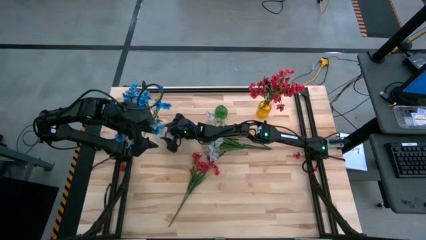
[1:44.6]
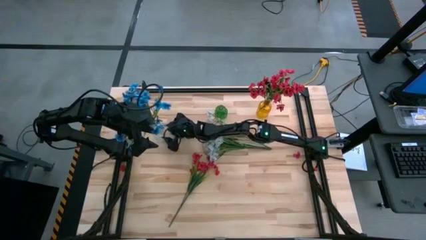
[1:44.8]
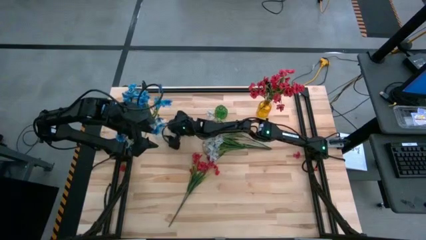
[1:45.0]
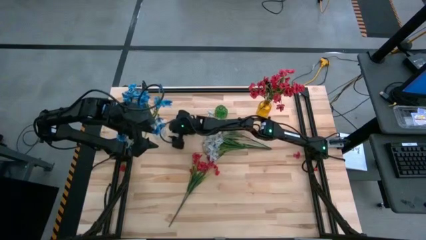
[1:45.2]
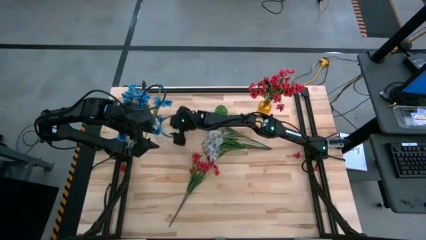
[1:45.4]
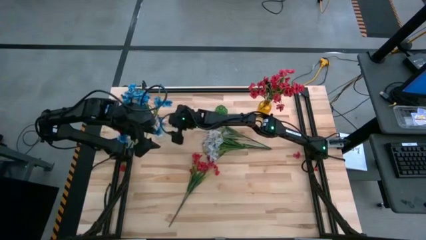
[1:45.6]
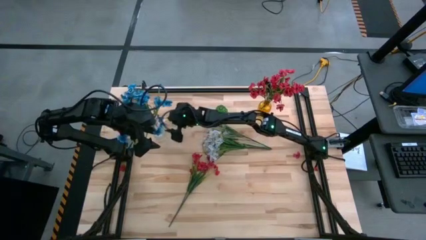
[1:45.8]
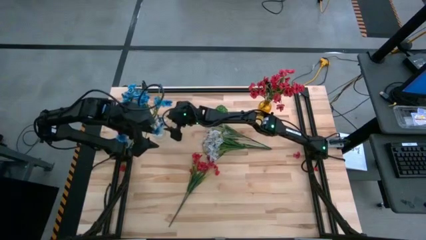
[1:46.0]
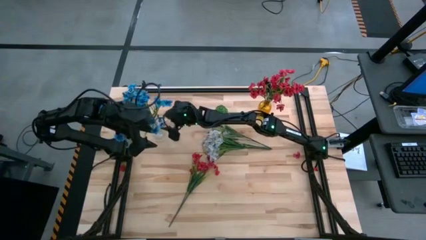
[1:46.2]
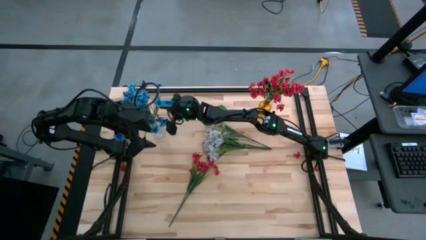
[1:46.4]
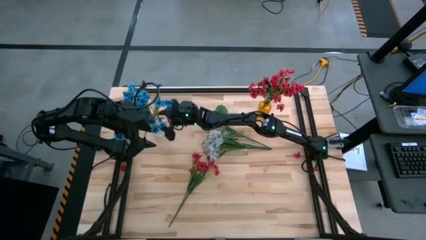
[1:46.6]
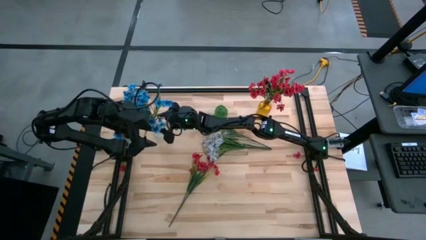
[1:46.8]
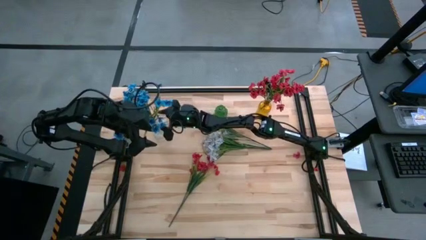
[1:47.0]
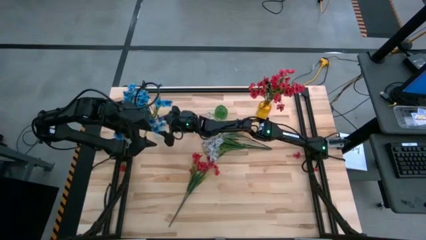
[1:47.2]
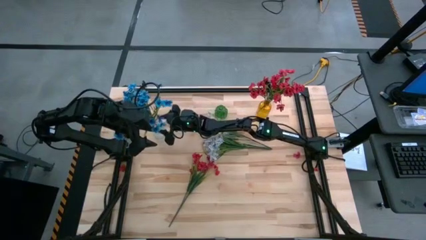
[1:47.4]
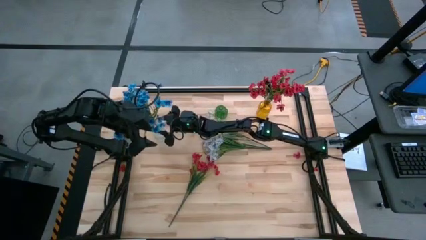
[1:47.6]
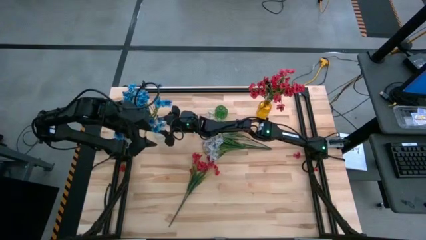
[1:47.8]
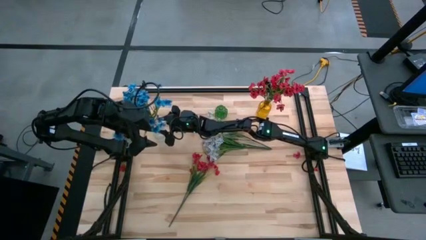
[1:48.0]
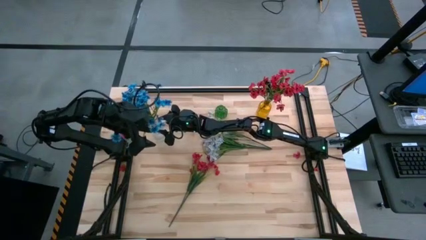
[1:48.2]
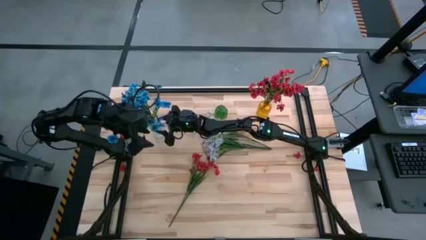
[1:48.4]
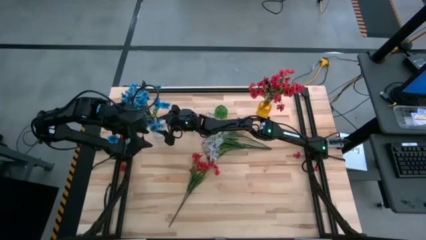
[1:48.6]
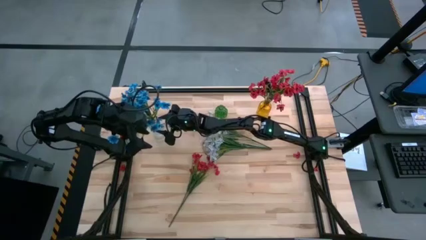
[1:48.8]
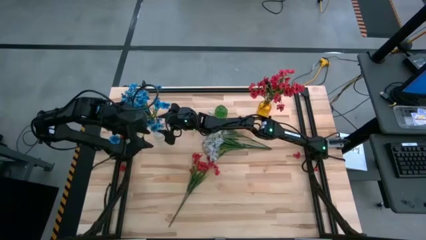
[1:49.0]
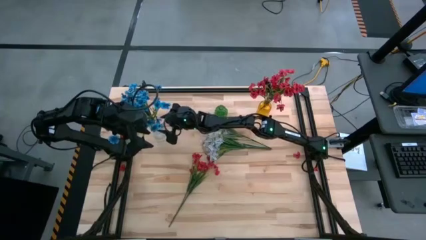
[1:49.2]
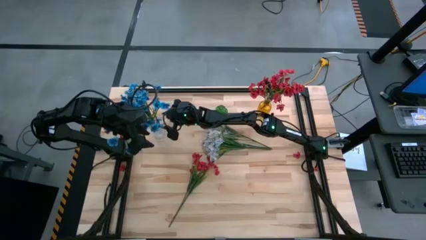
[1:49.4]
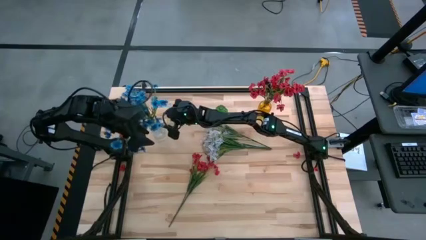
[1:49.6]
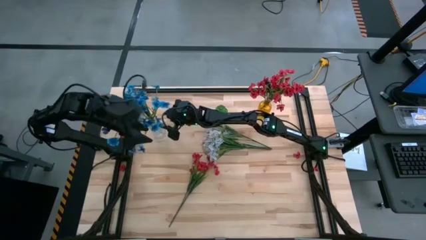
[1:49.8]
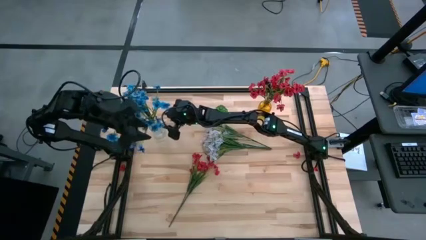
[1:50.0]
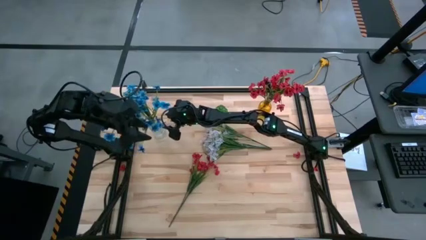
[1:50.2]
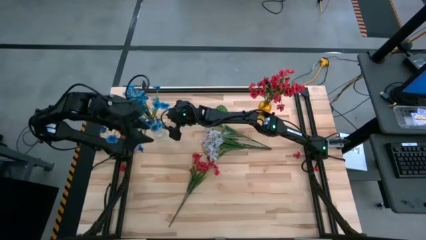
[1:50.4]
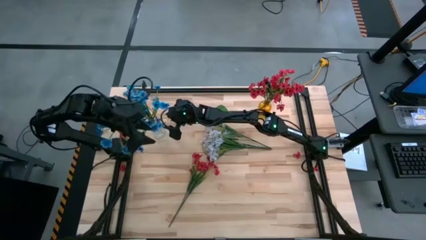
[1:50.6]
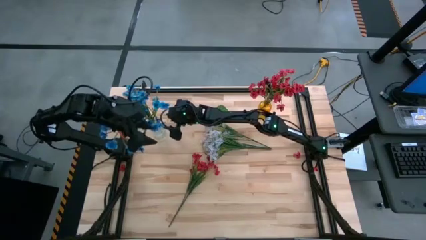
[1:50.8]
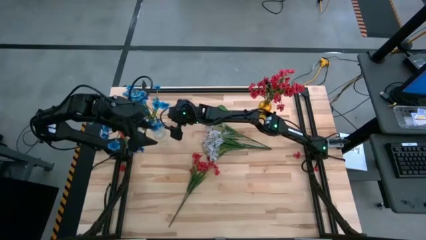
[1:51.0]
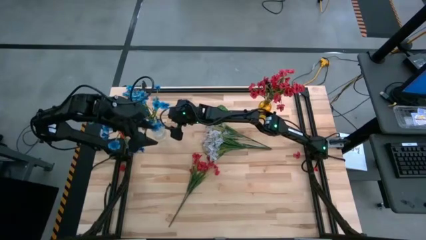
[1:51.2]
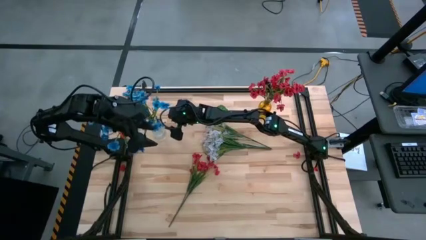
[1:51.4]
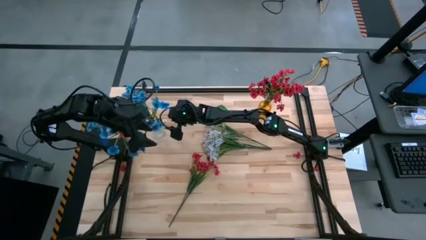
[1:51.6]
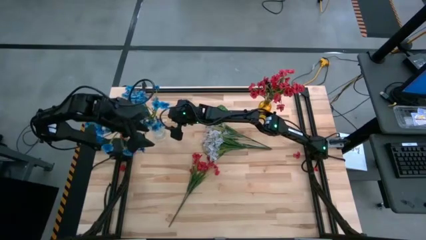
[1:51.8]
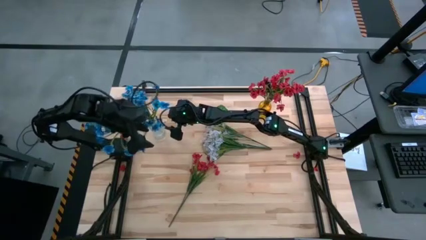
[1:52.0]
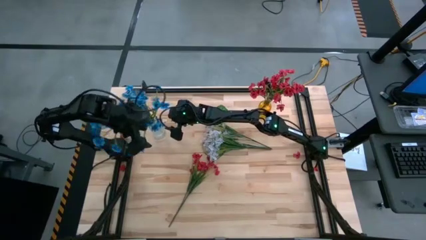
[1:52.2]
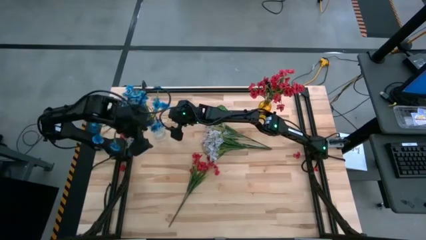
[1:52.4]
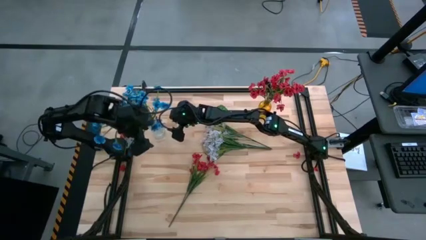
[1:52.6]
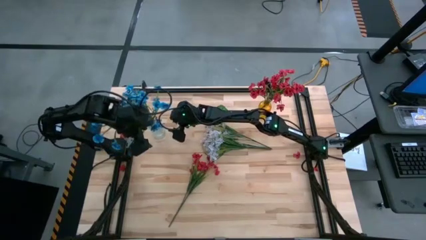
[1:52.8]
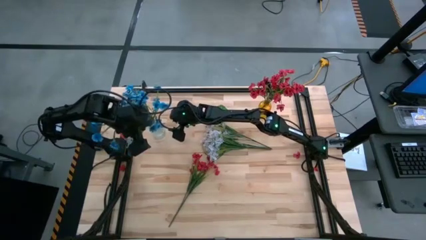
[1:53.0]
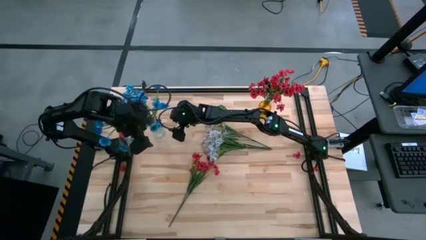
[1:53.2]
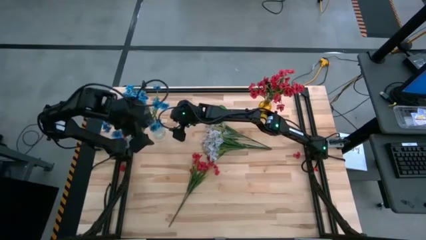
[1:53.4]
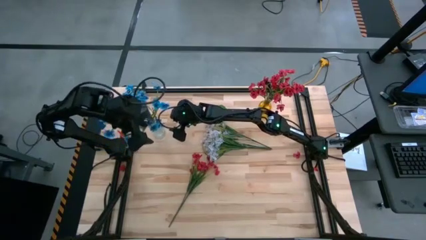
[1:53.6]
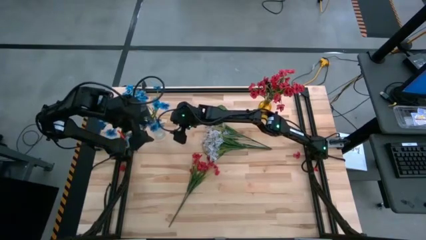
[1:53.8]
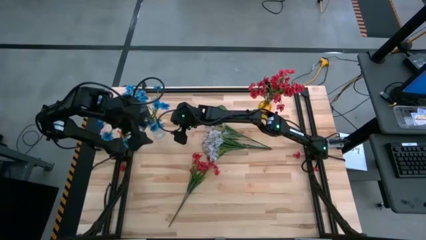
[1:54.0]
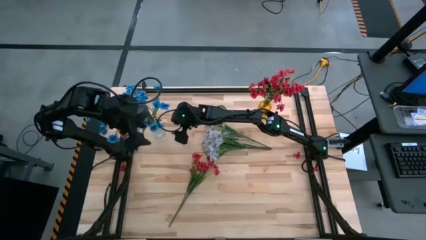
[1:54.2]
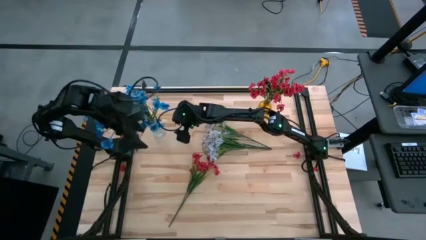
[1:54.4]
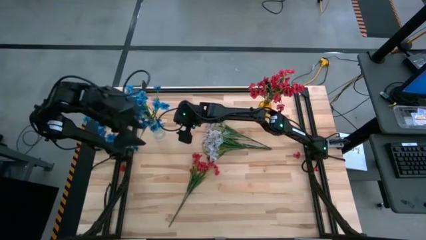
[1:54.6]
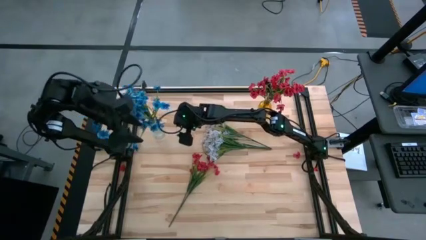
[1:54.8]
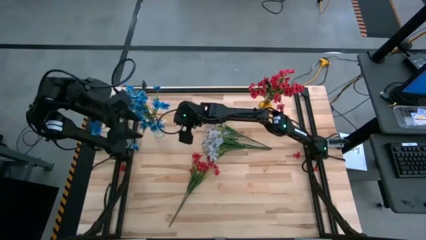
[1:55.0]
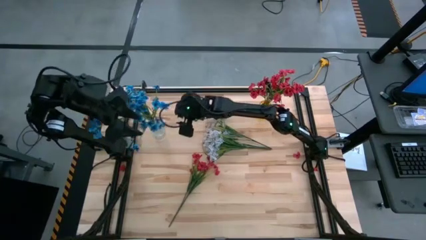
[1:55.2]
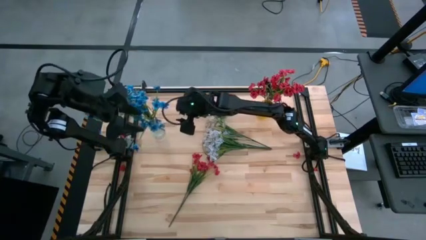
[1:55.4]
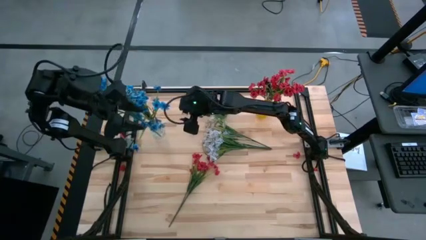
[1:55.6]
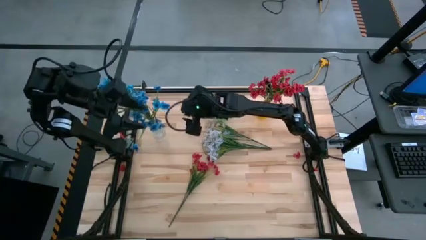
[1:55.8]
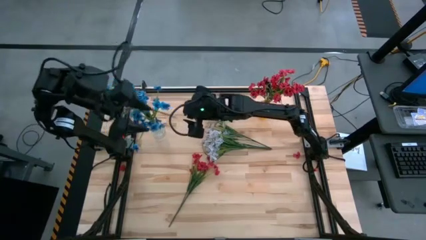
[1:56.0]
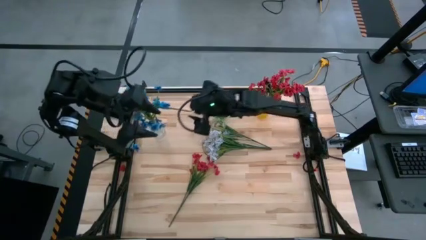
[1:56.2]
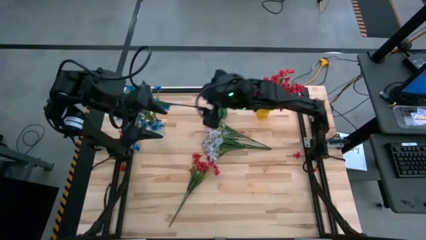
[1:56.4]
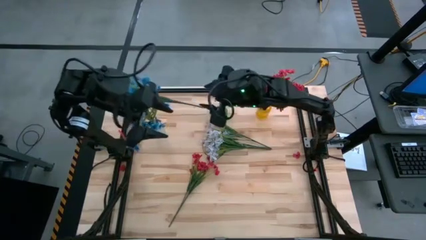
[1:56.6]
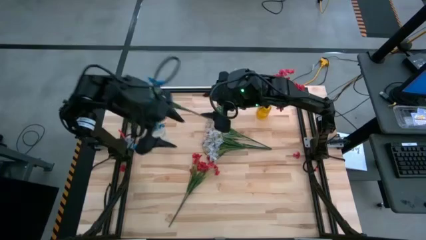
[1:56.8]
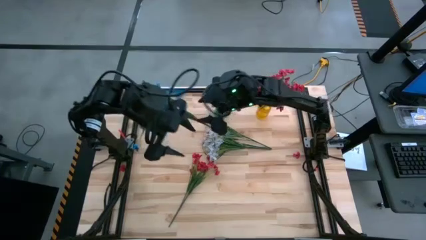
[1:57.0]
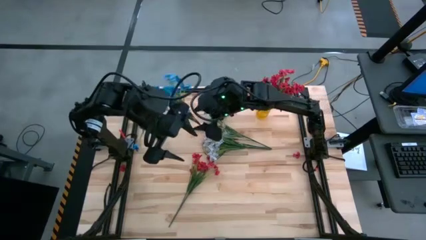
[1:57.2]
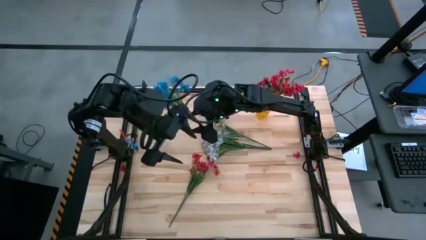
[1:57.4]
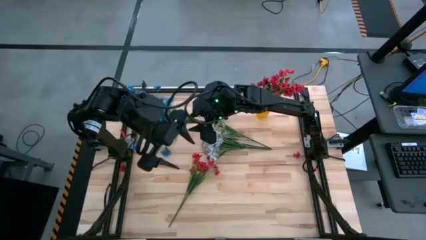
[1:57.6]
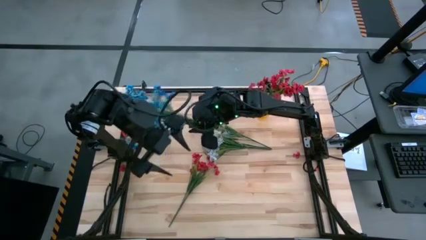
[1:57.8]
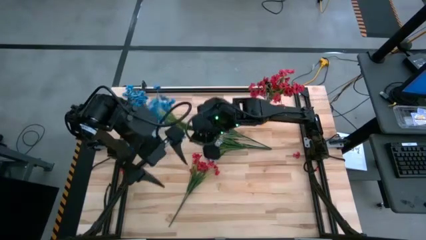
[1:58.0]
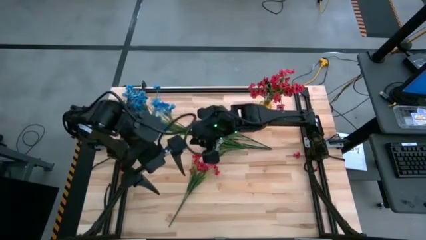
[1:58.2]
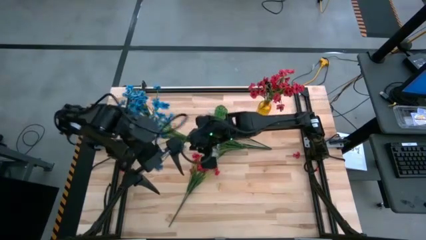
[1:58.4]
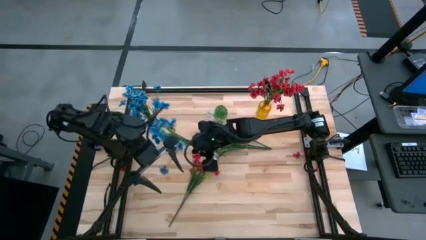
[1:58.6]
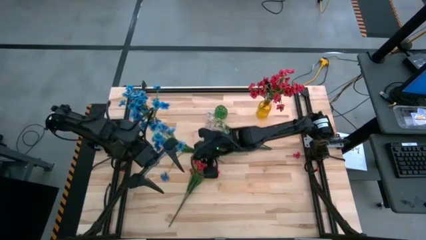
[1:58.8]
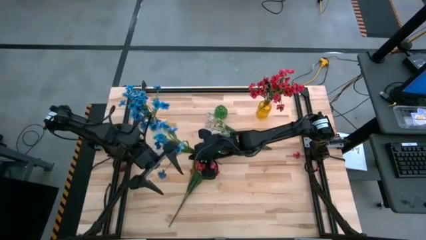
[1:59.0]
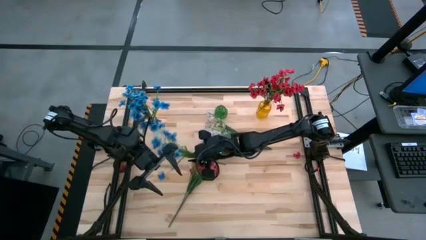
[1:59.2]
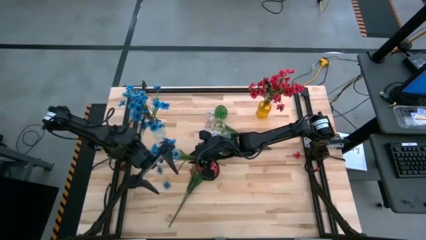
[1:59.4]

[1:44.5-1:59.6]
Task: Sort flowers into vase by color
Put the blue flowers into the transparent vase
